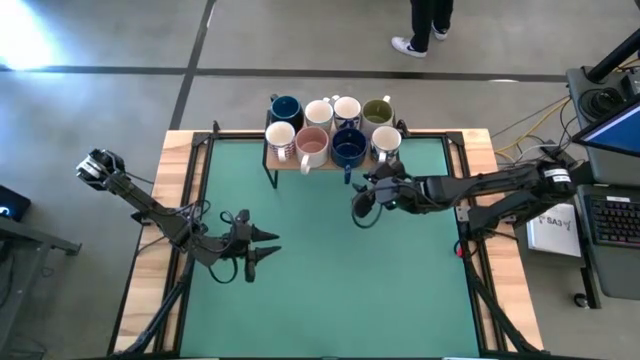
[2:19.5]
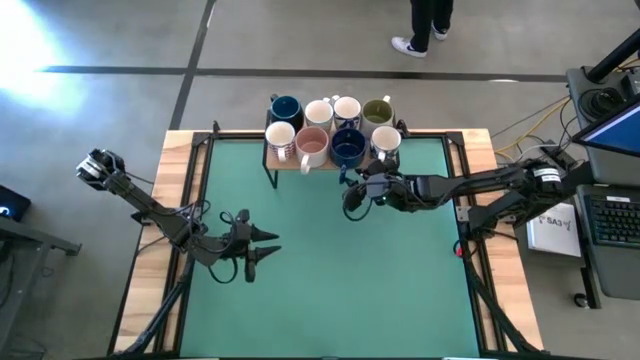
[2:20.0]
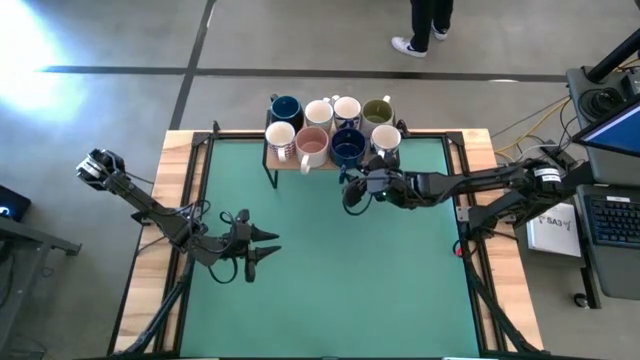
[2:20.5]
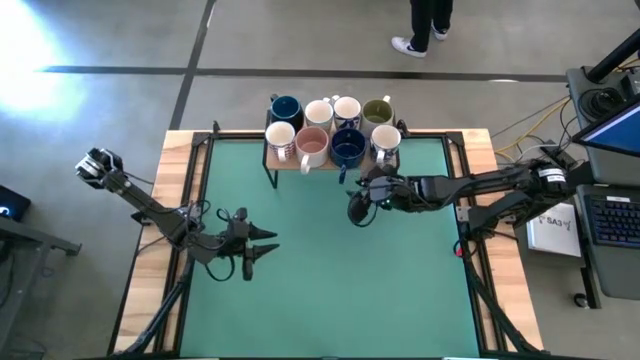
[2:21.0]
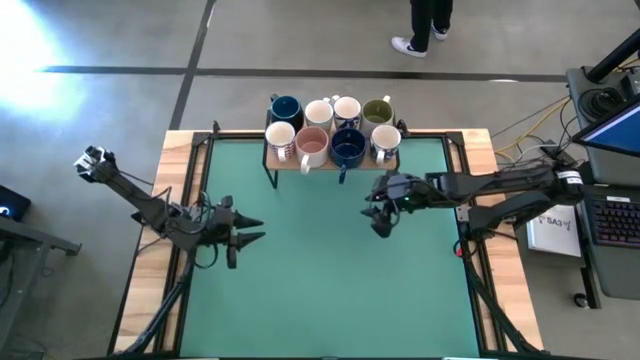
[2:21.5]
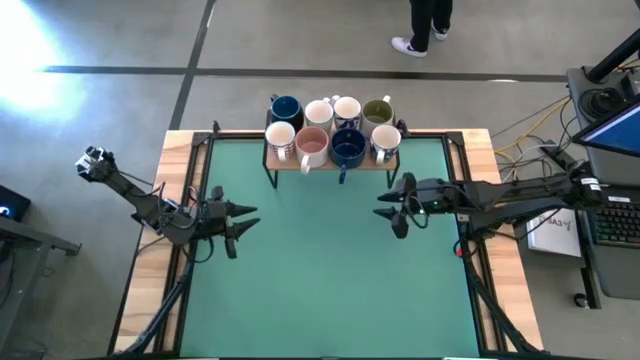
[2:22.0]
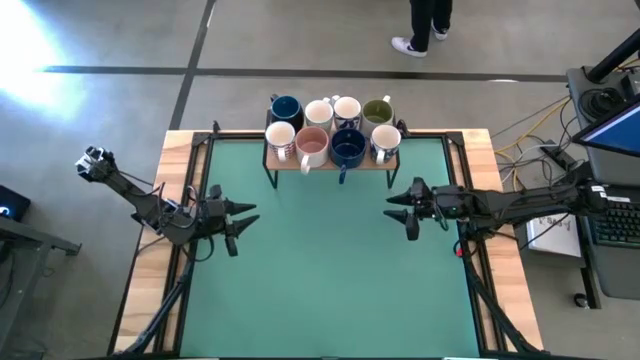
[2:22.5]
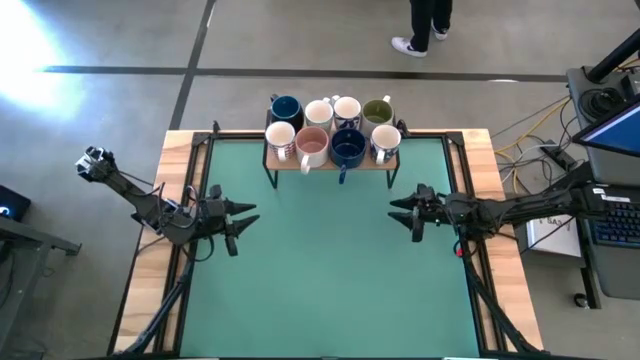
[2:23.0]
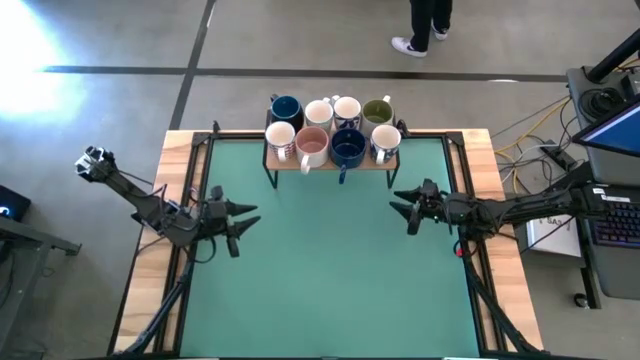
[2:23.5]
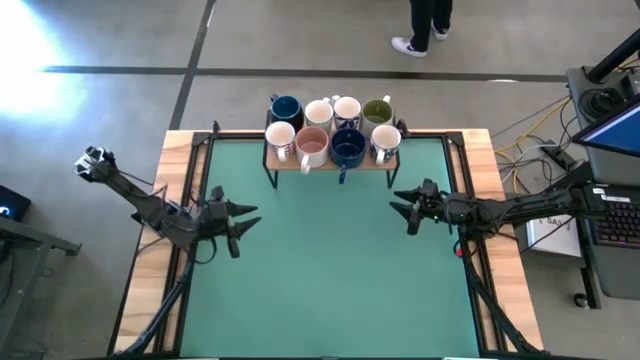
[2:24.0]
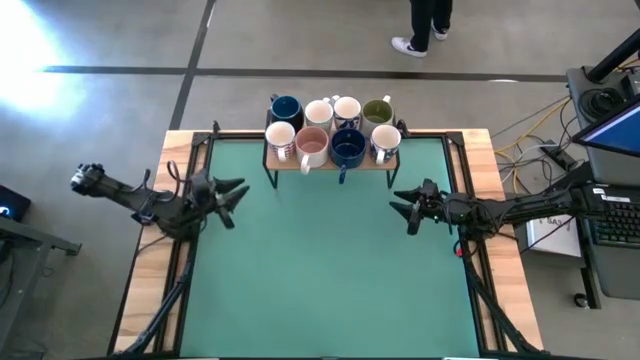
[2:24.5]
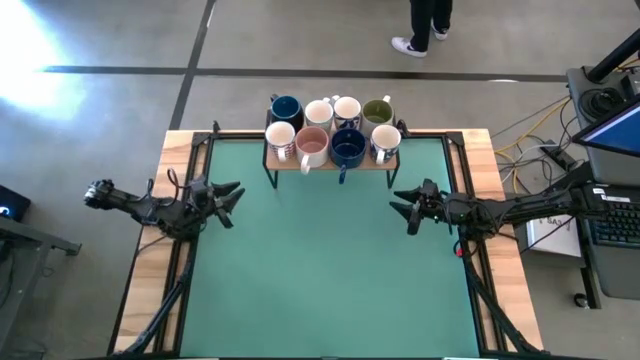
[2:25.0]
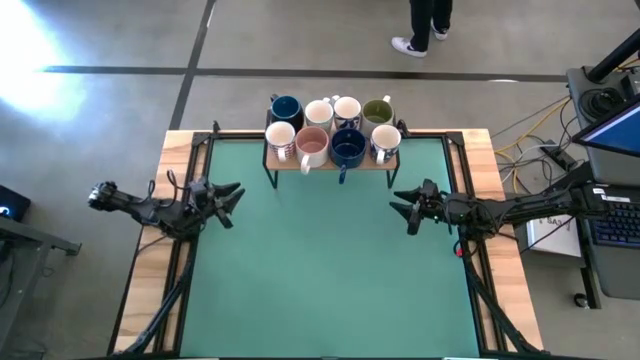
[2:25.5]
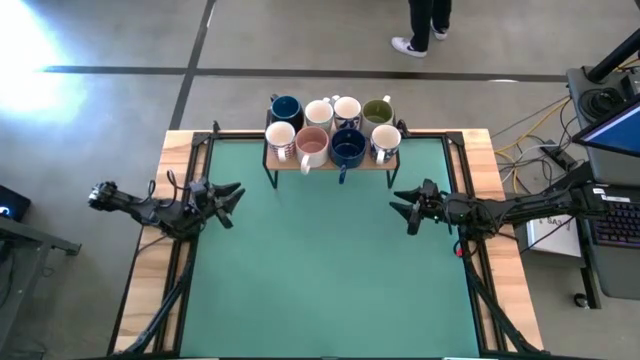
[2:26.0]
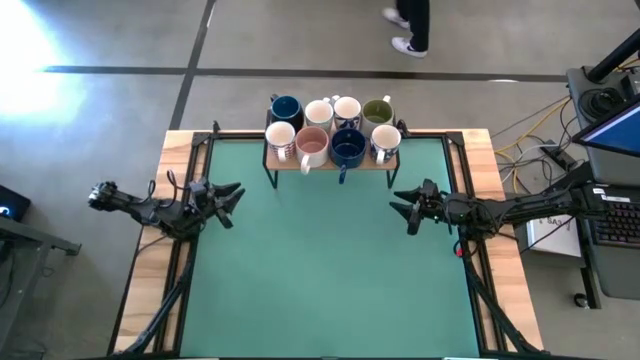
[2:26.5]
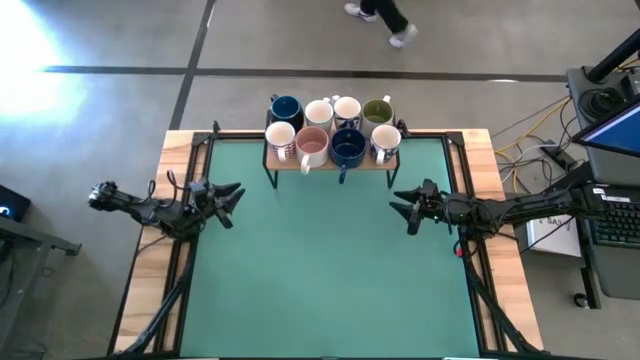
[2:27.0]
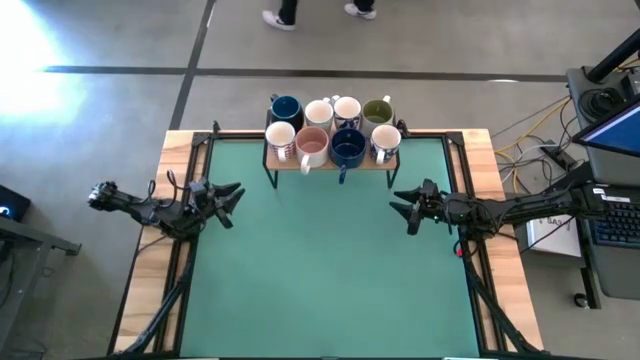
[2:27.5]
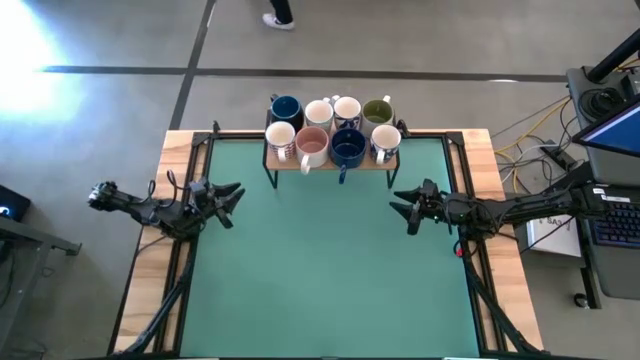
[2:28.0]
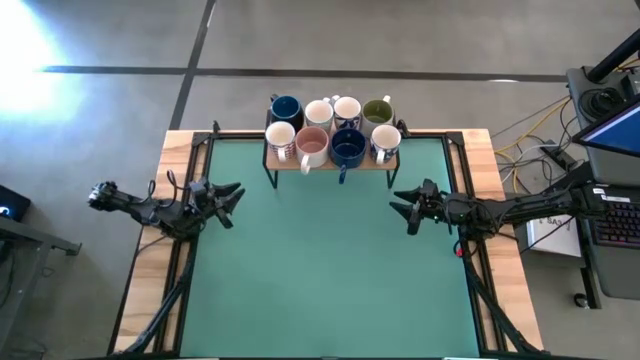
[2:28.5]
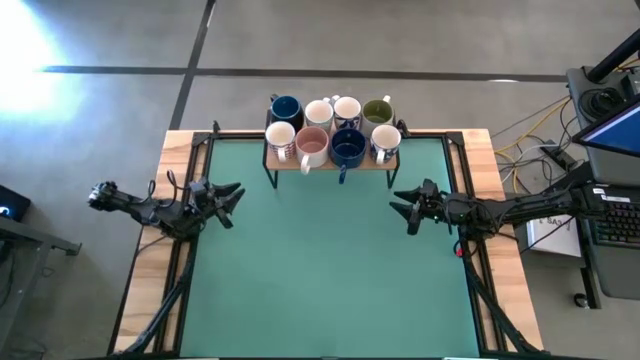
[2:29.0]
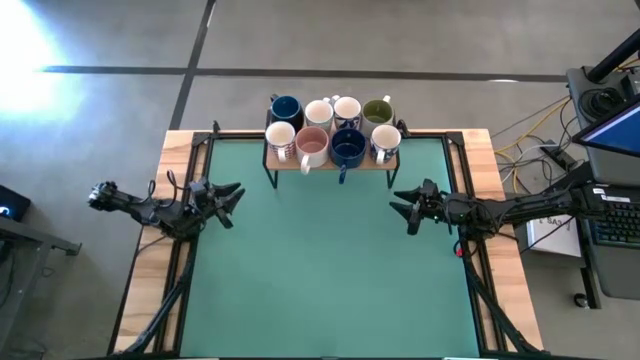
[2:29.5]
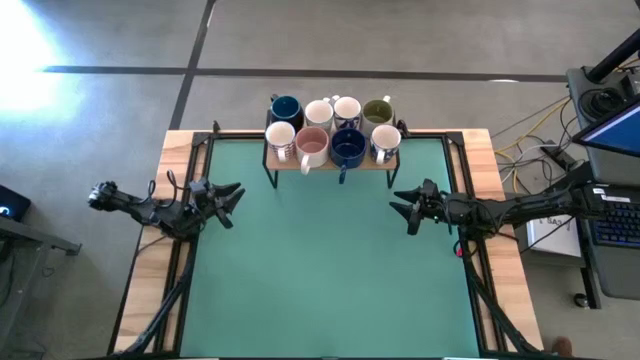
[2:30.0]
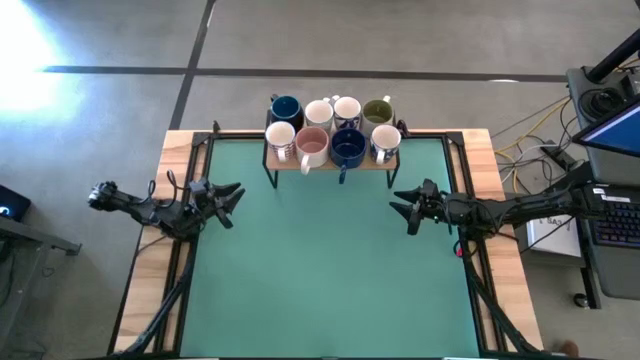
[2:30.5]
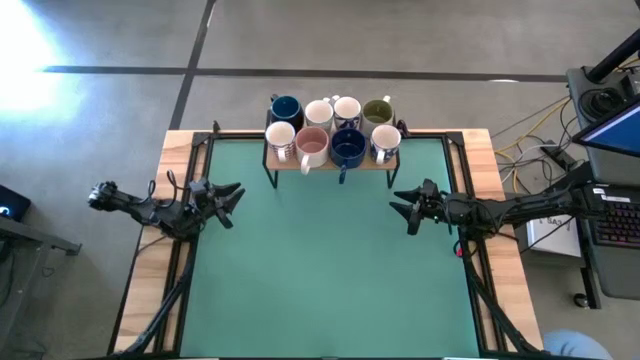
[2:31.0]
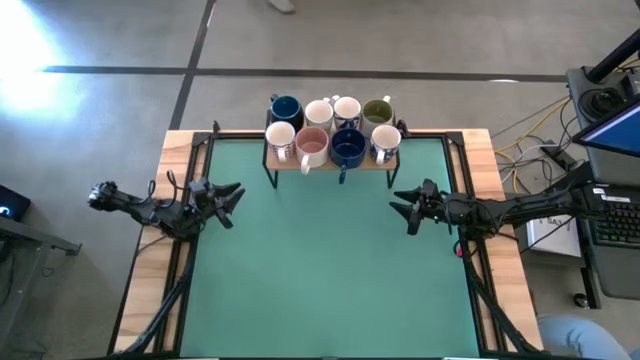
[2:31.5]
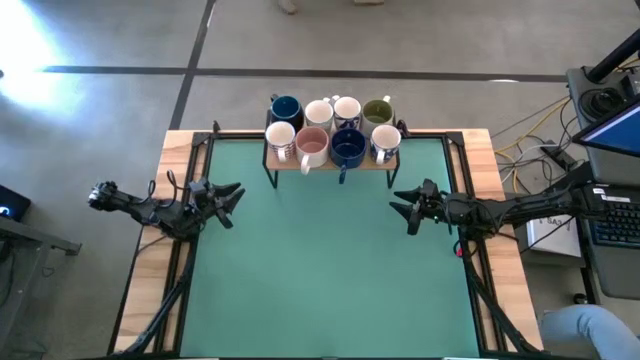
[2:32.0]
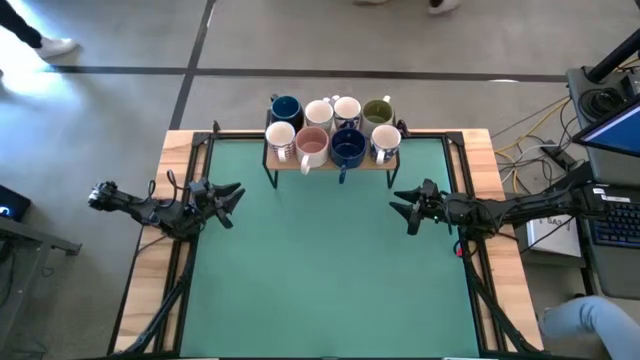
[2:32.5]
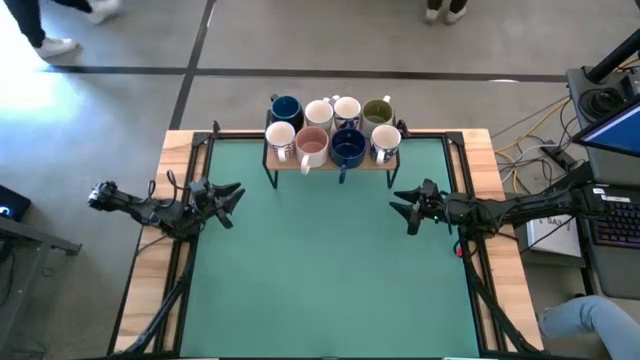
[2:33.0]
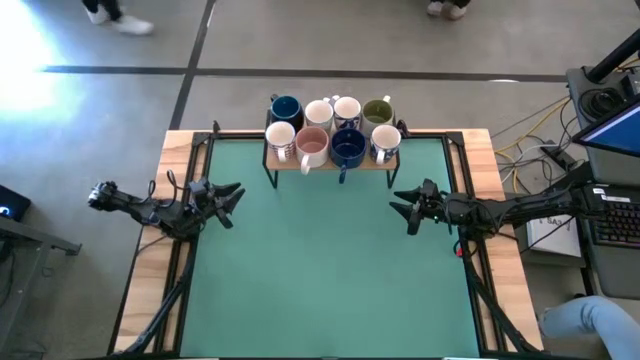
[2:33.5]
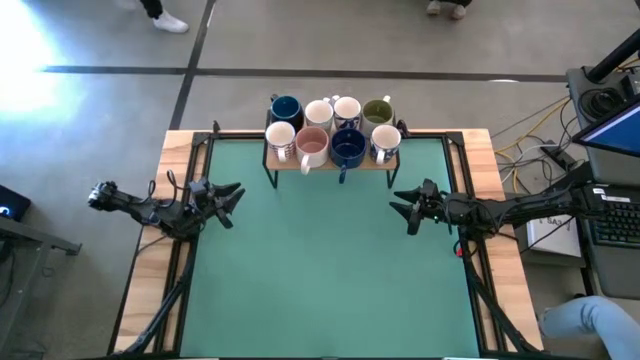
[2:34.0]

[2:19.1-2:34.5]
Task: Place coffee mugs
Return to Home Position
